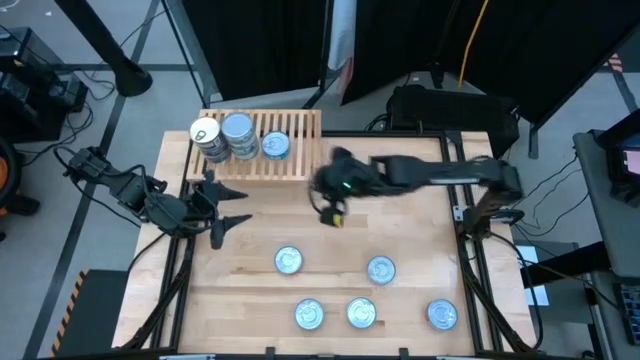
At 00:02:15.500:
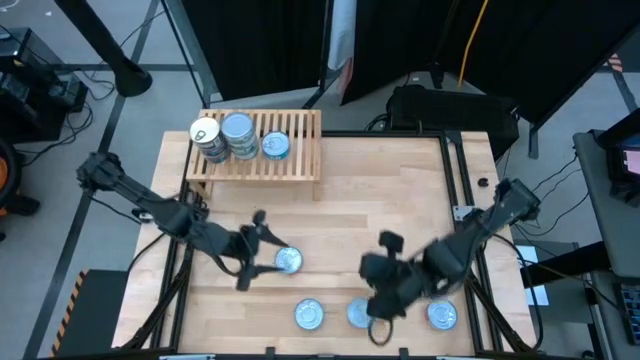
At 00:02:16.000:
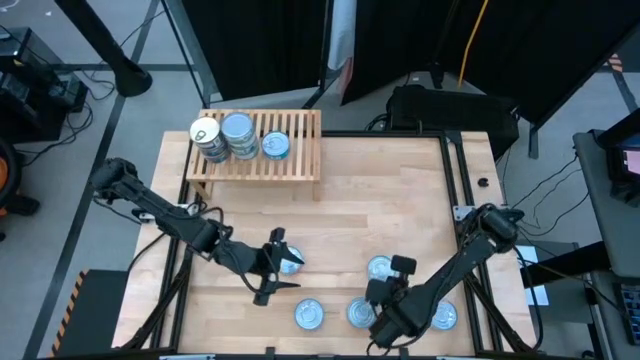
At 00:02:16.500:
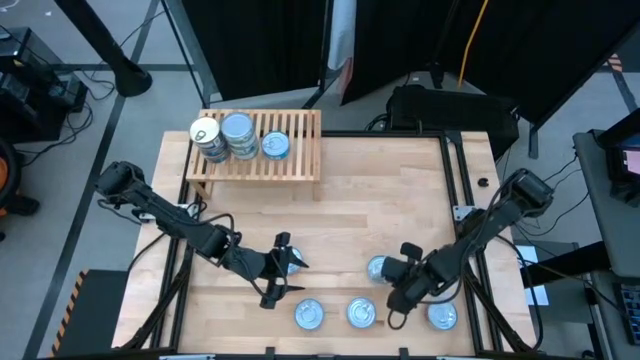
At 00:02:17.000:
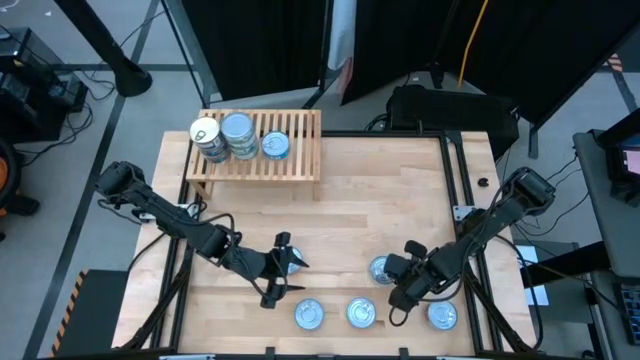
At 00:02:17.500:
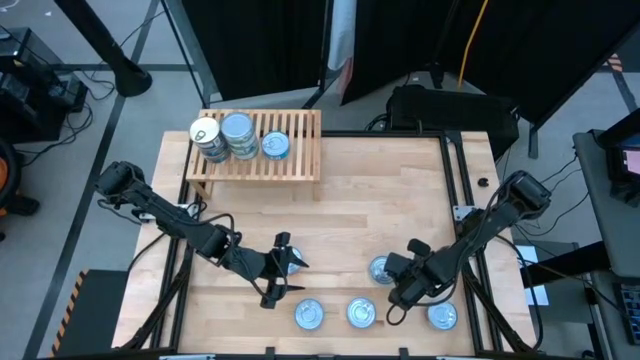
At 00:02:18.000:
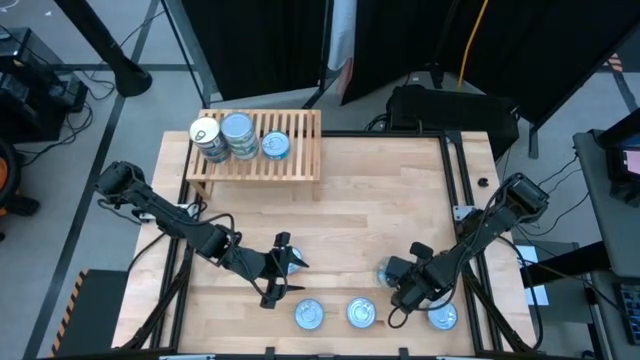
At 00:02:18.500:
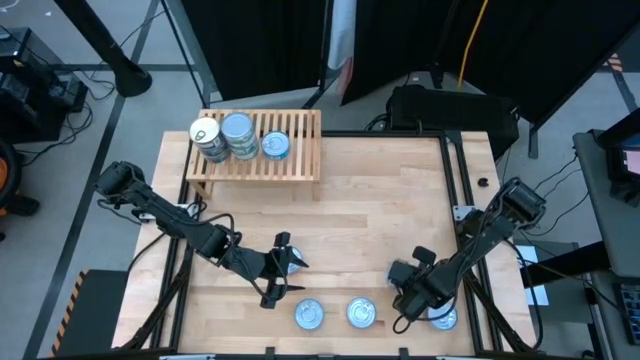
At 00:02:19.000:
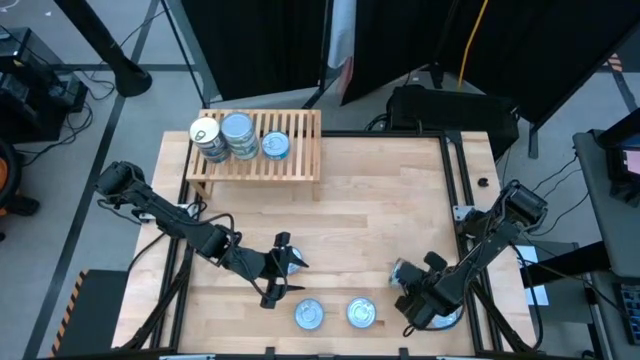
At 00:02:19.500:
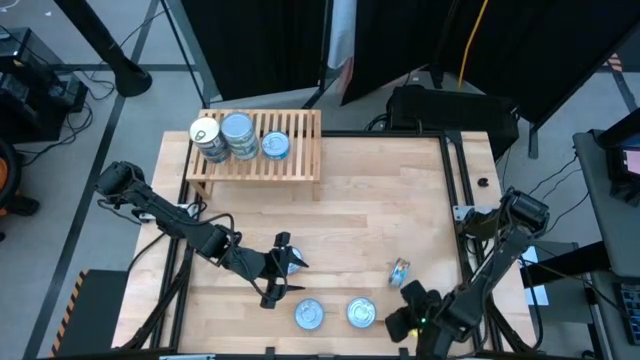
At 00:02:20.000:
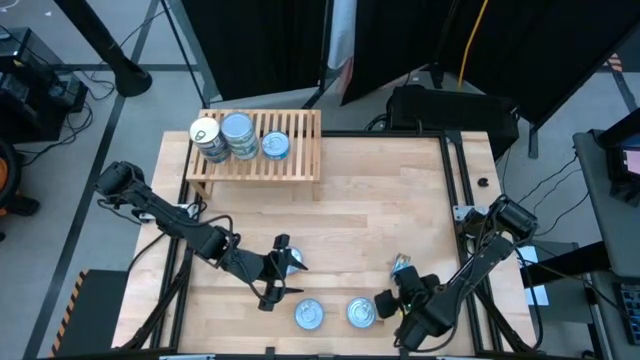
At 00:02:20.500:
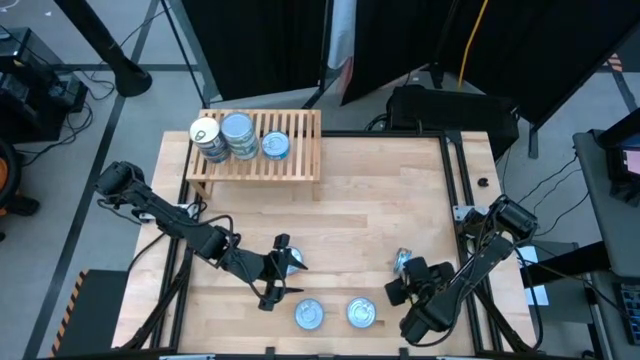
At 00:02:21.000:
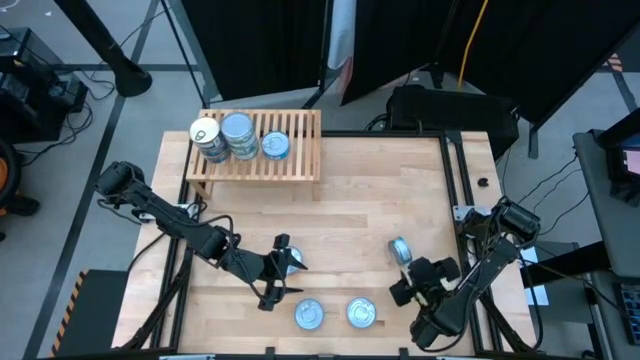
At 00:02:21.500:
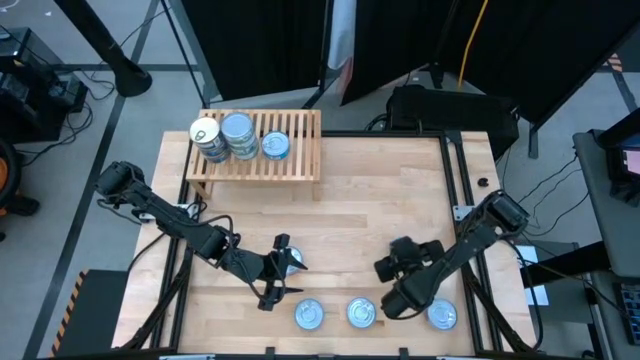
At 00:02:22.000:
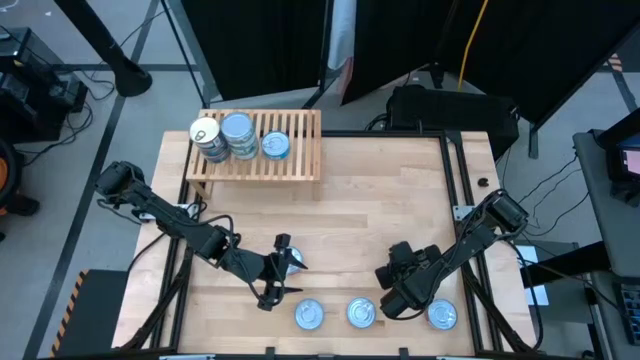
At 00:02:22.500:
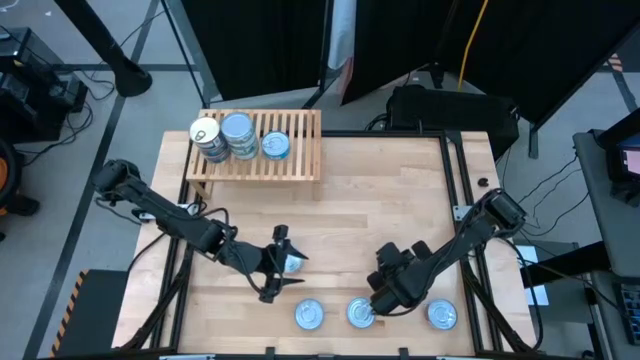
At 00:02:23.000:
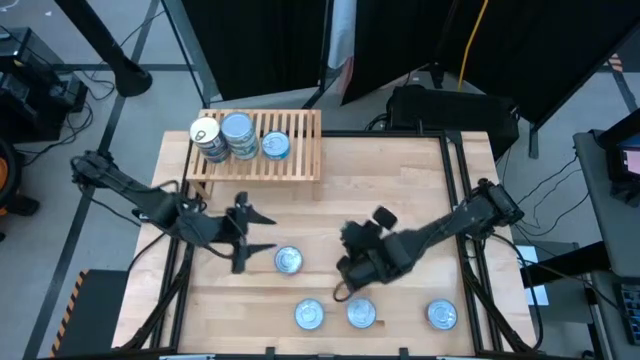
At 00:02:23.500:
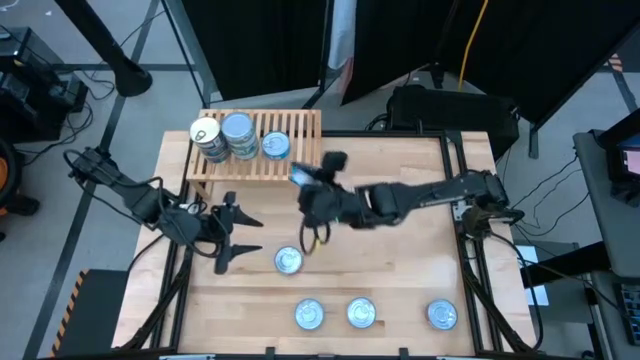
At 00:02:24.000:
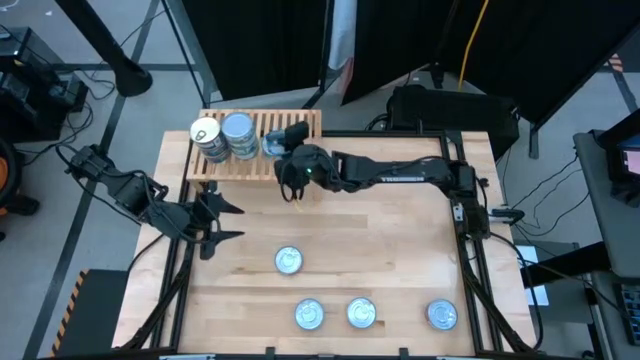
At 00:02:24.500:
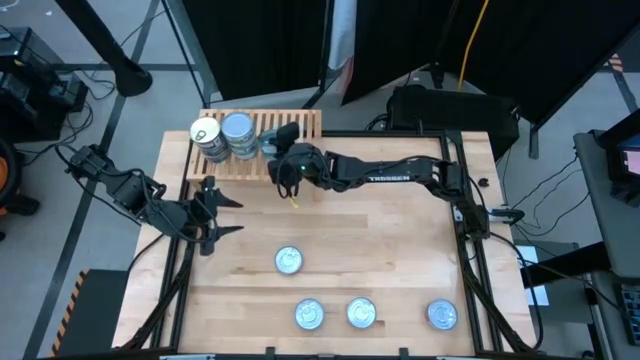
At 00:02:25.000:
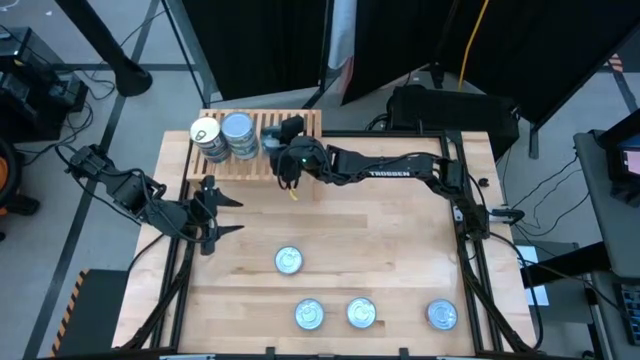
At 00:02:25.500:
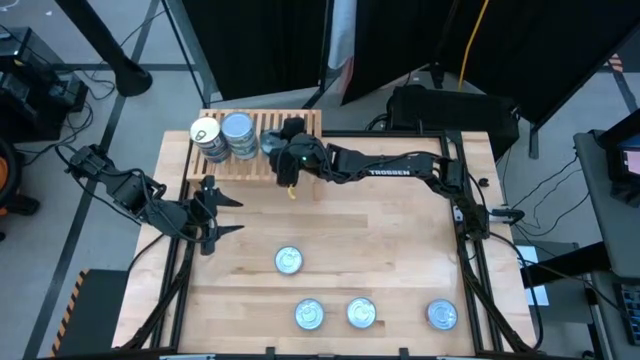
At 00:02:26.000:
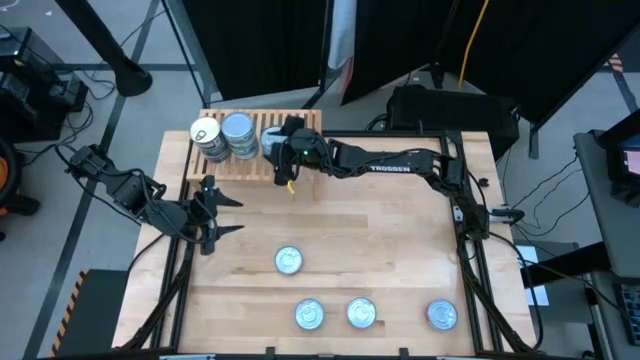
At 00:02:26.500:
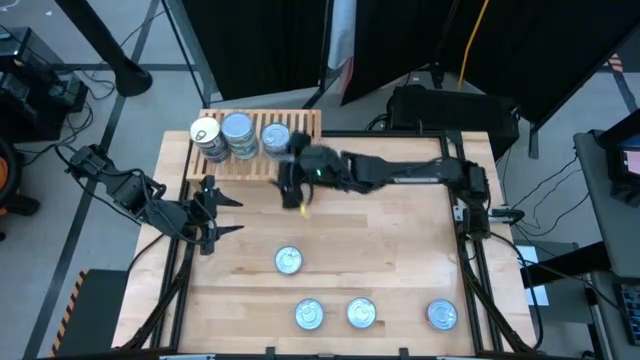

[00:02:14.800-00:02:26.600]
Task: Stack canned seafood by type on shelf
Stack the right light blue can on top of the other light blue can

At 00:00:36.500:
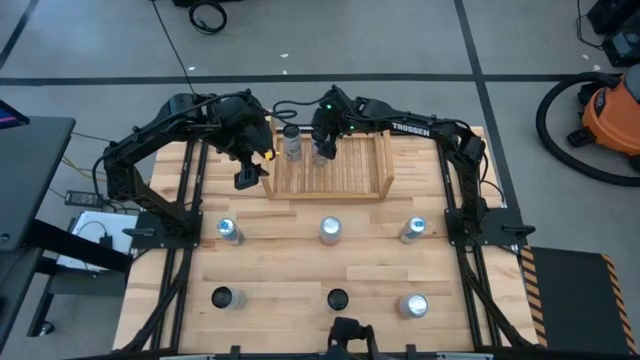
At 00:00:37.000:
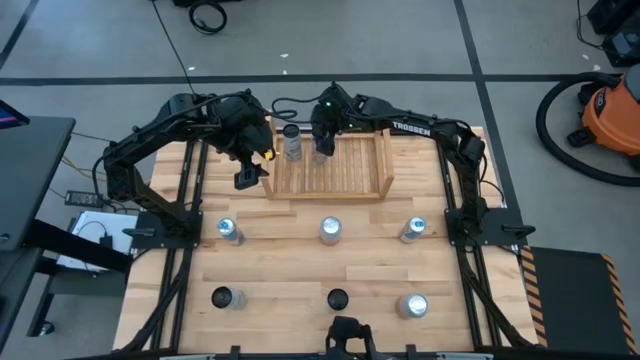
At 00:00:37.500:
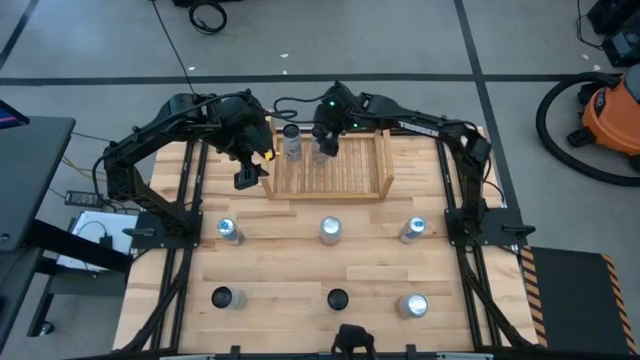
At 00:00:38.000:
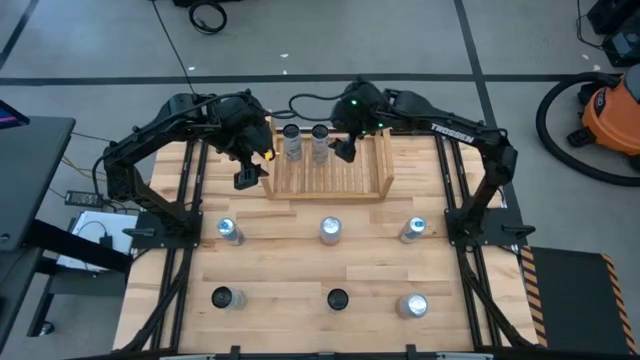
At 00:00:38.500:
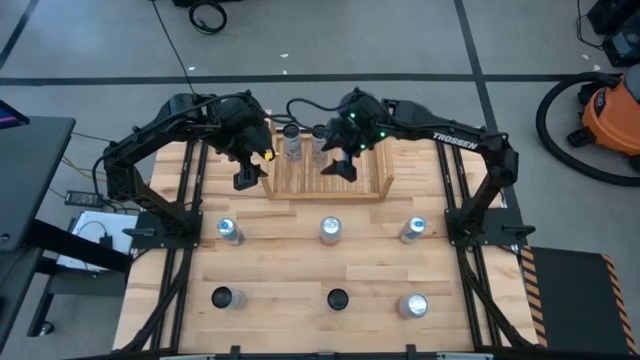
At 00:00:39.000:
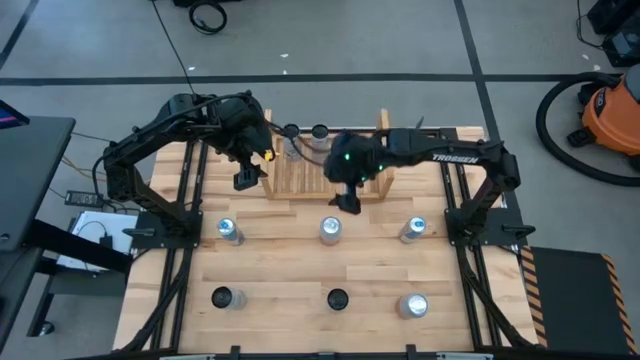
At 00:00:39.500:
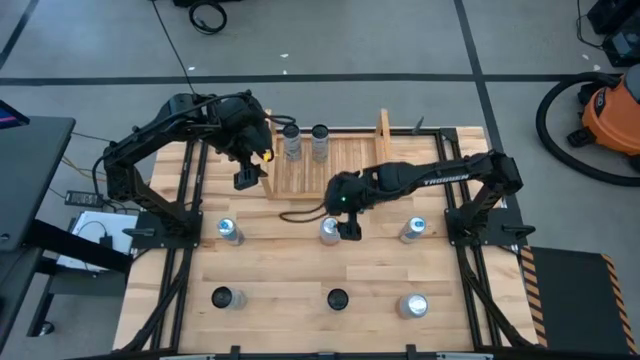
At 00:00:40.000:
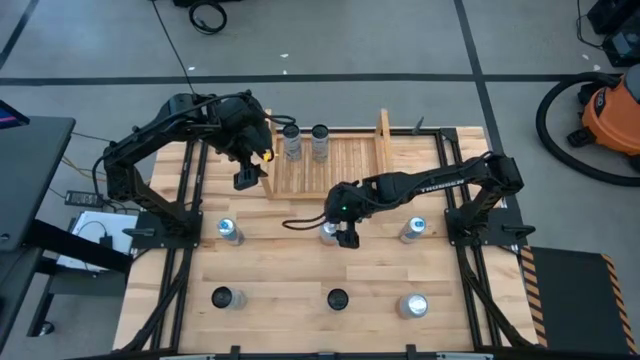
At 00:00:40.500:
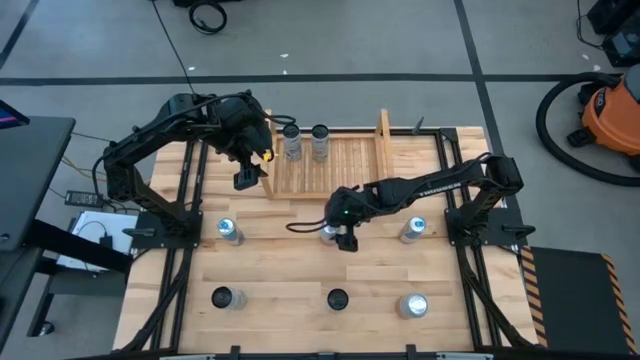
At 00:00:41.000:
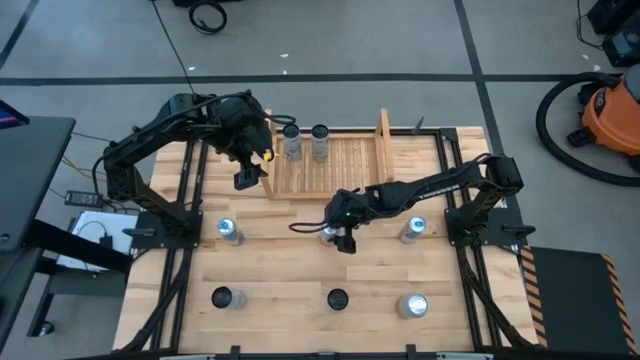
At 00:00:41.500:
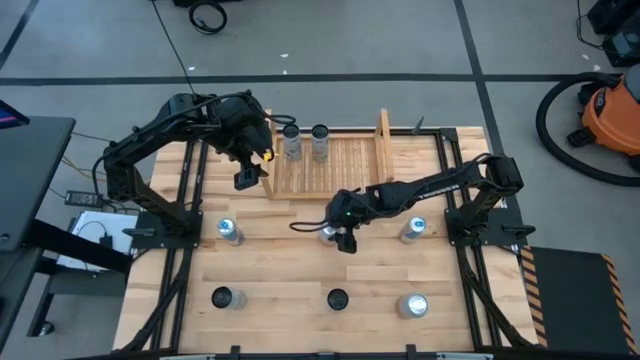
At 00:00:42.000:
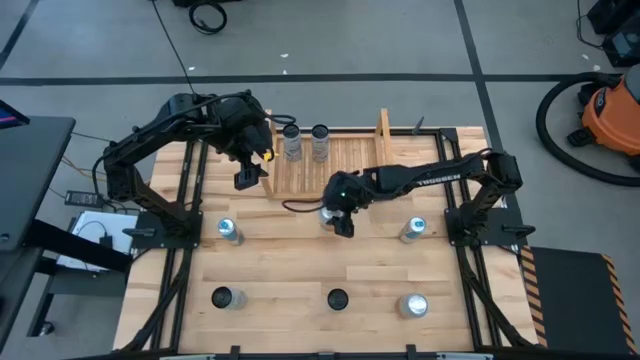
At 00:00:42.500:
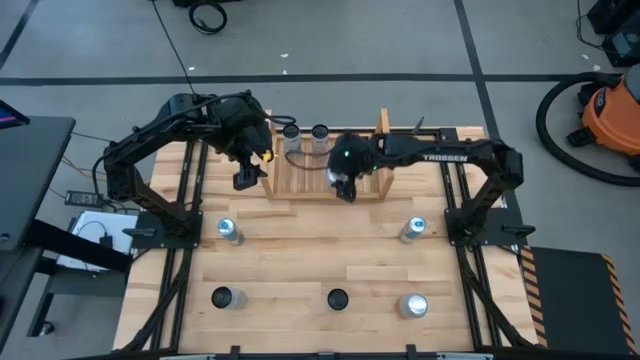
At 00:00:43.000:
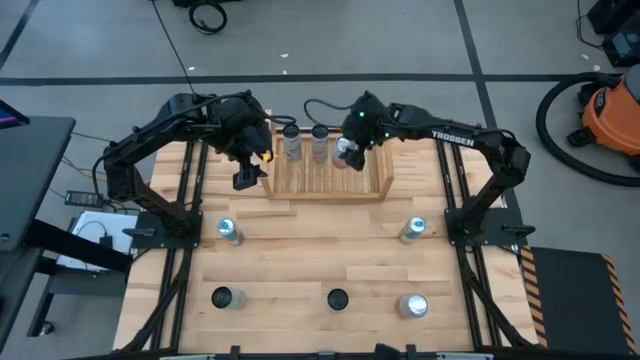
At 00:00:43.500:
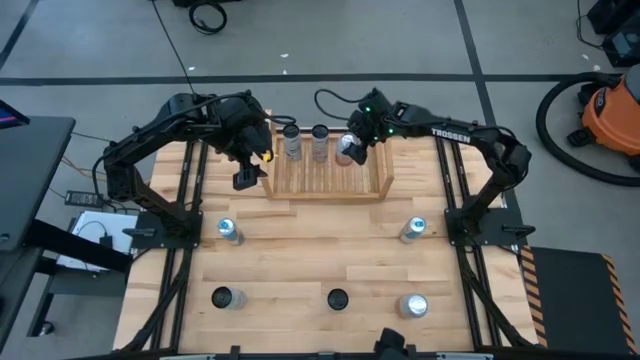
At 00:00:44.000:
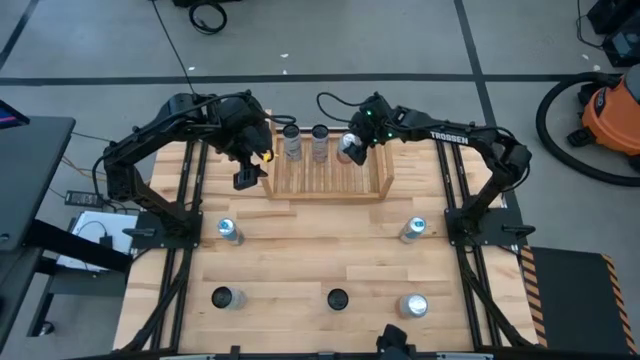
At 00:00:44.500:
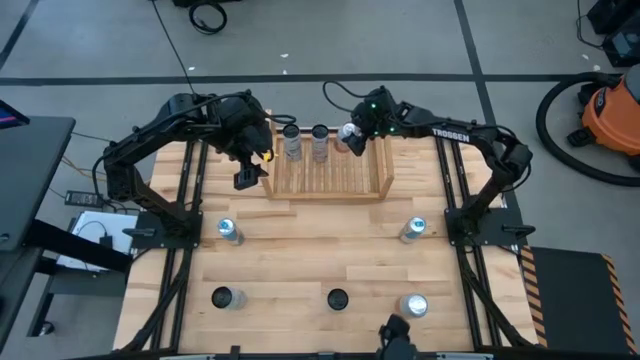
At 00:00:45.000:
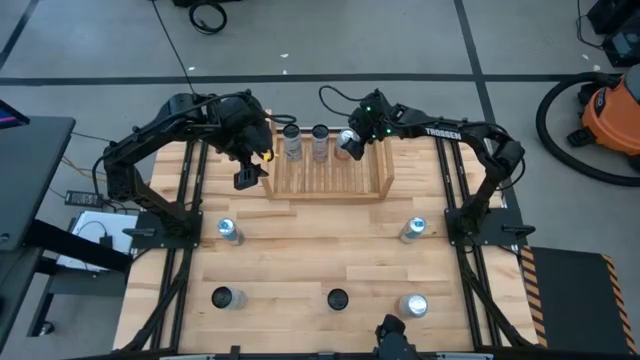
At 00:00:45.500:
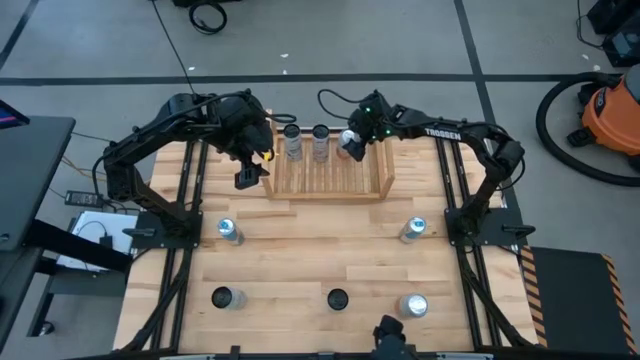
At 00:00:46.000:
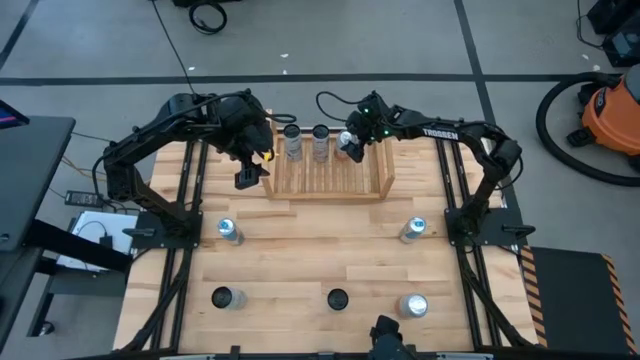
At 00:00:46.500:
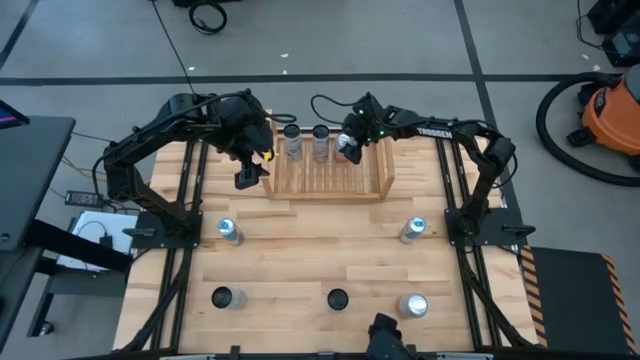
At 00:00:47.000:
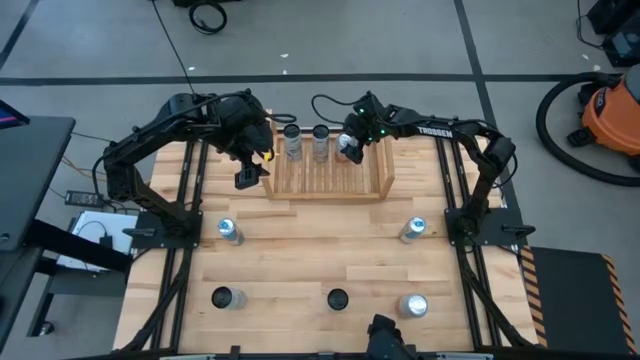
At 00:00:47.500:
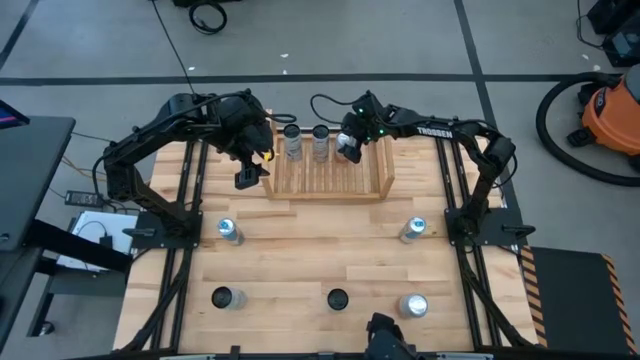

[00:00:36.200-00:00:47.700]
Task: Place canned beverage on shelf
Put the top pink white soda can into the shelf
